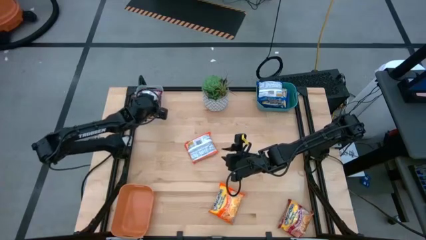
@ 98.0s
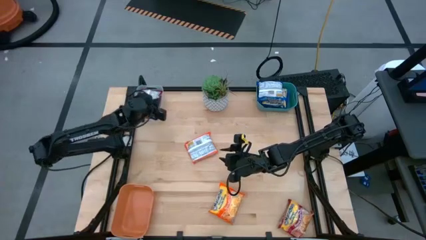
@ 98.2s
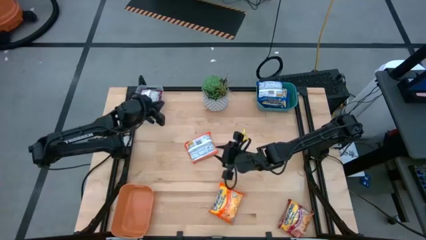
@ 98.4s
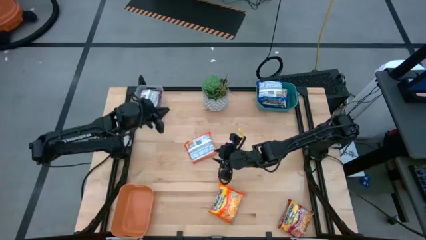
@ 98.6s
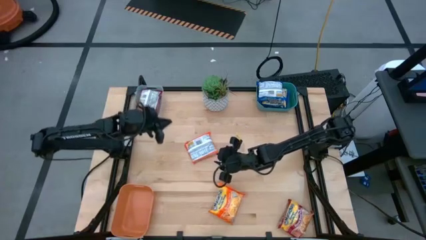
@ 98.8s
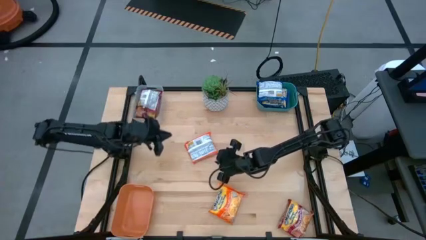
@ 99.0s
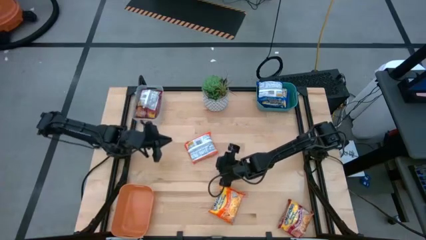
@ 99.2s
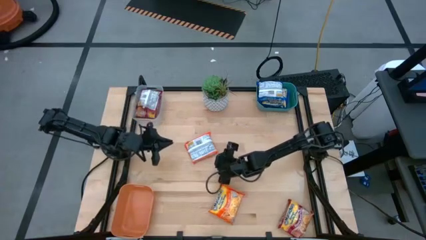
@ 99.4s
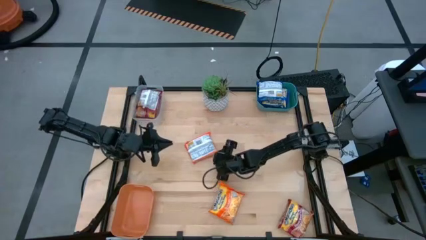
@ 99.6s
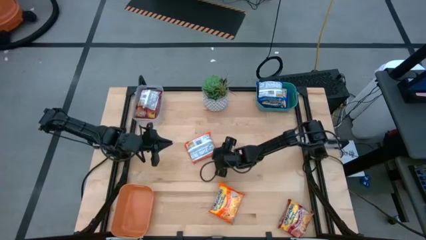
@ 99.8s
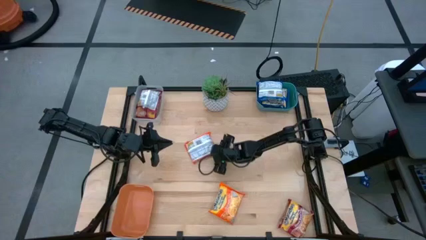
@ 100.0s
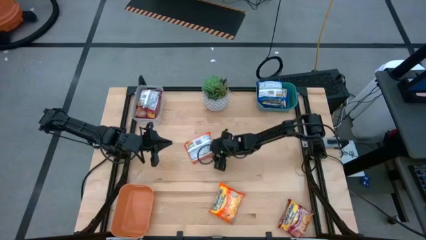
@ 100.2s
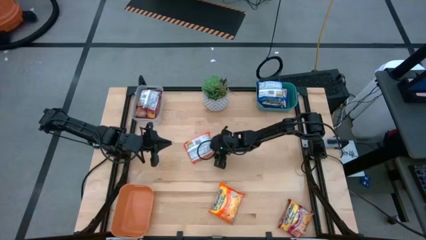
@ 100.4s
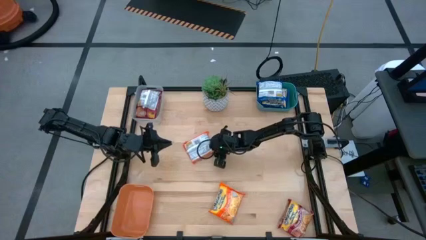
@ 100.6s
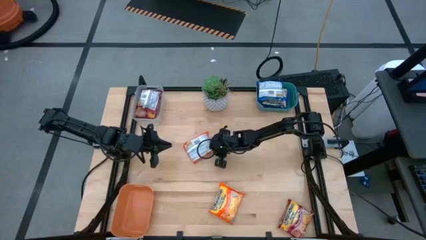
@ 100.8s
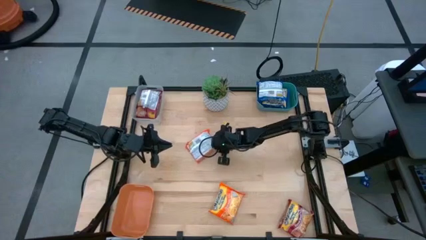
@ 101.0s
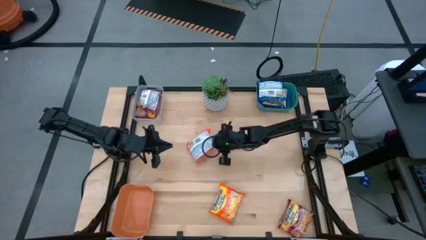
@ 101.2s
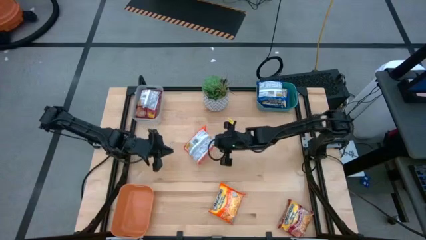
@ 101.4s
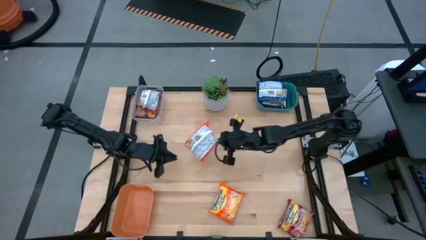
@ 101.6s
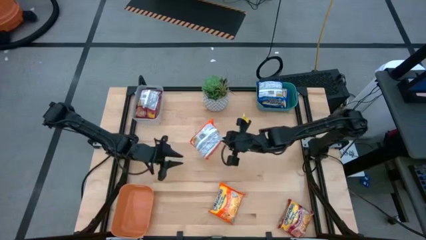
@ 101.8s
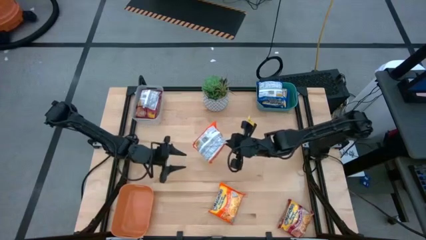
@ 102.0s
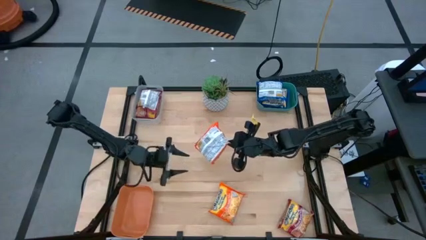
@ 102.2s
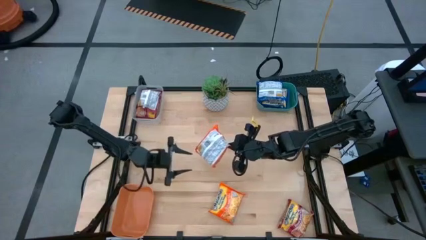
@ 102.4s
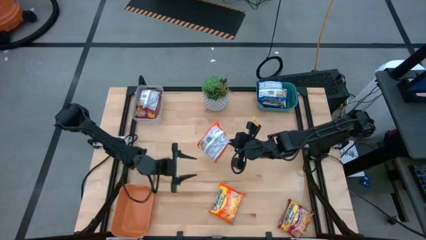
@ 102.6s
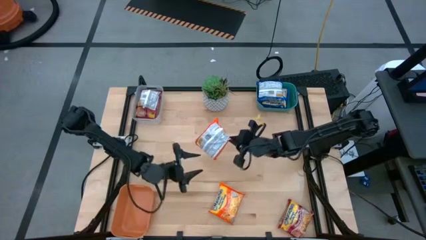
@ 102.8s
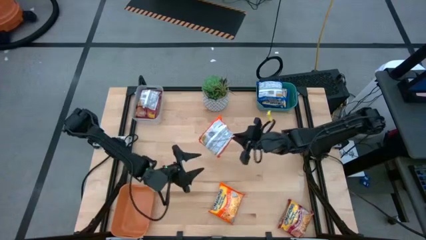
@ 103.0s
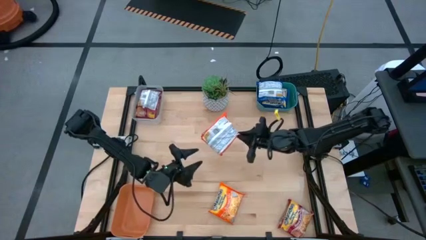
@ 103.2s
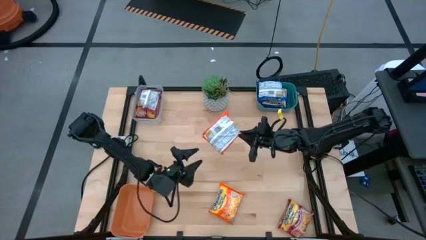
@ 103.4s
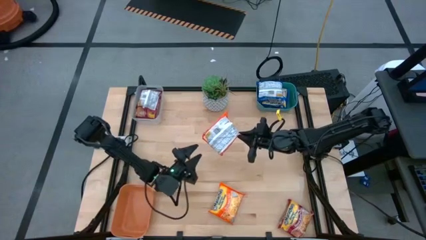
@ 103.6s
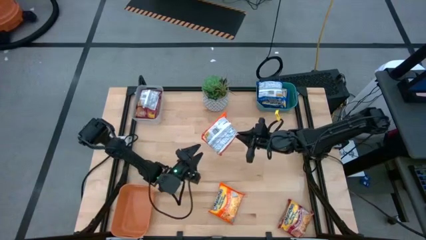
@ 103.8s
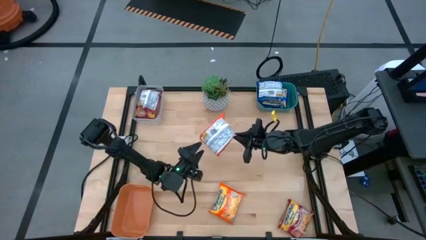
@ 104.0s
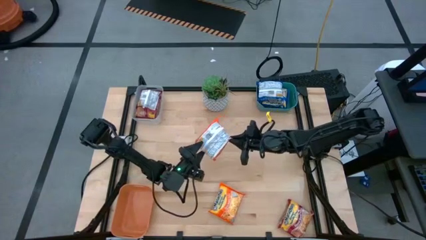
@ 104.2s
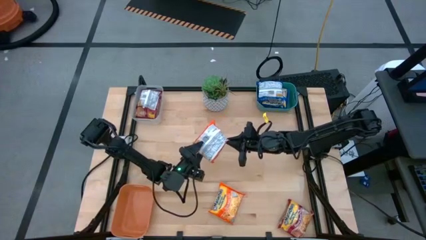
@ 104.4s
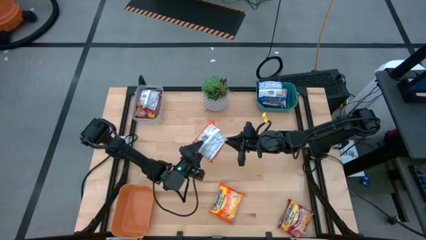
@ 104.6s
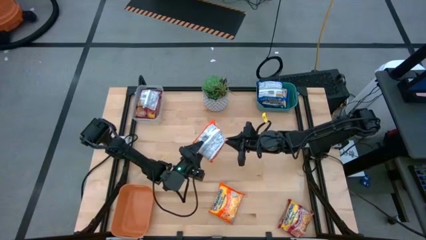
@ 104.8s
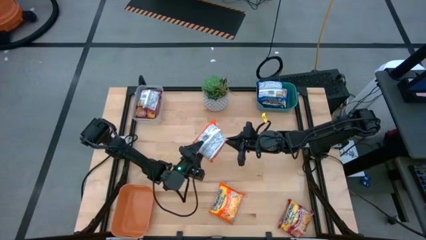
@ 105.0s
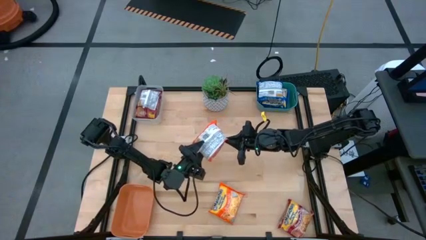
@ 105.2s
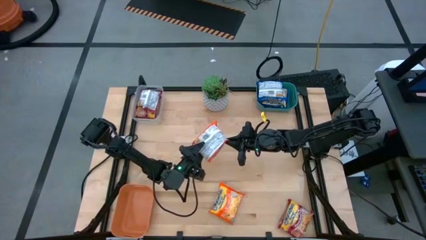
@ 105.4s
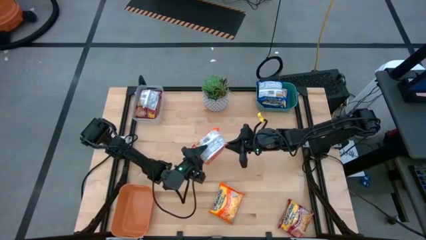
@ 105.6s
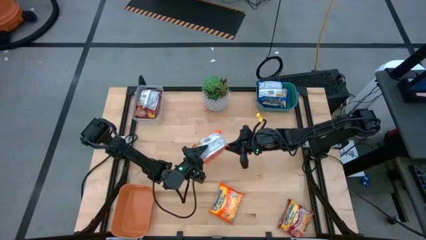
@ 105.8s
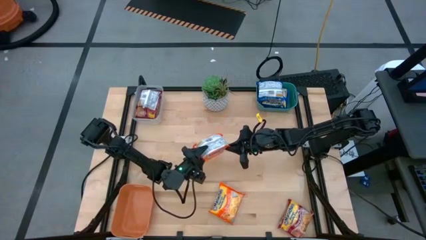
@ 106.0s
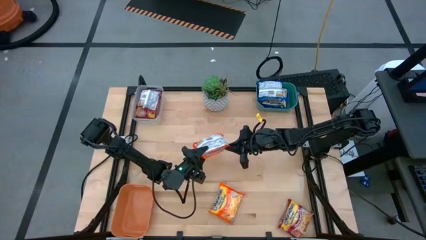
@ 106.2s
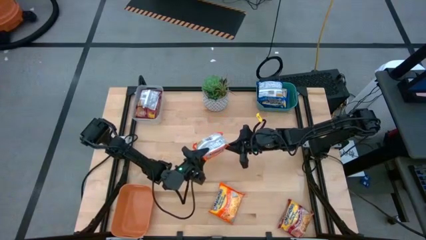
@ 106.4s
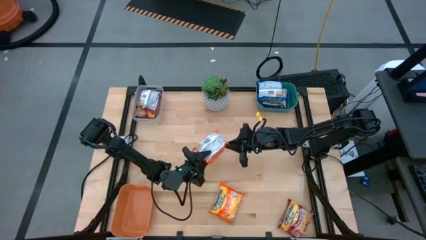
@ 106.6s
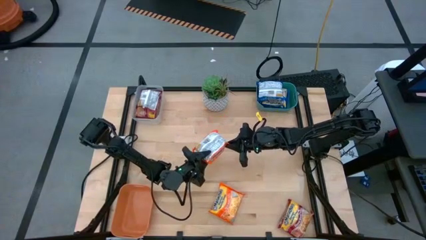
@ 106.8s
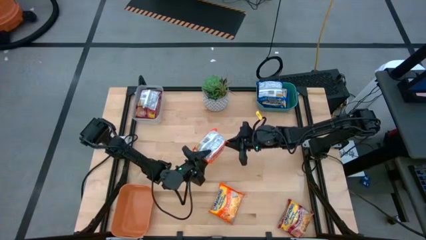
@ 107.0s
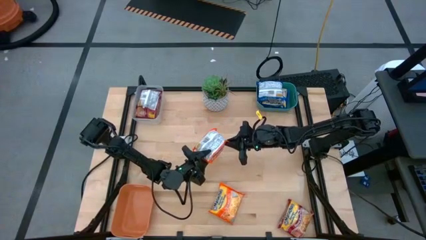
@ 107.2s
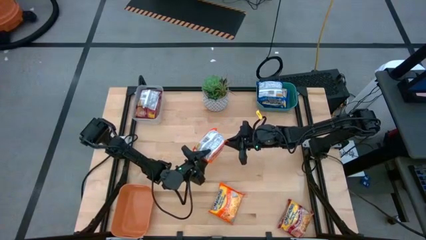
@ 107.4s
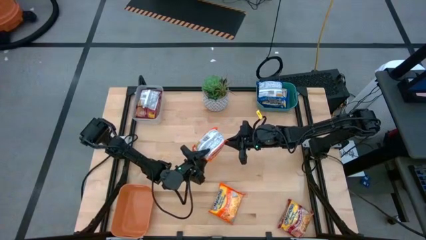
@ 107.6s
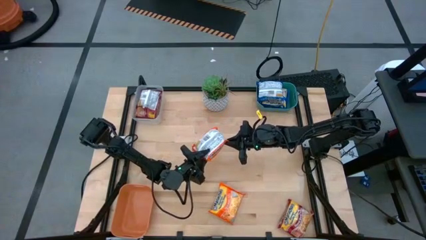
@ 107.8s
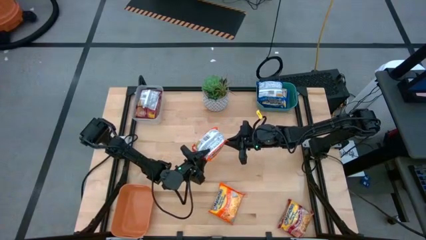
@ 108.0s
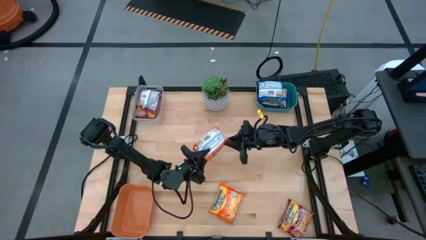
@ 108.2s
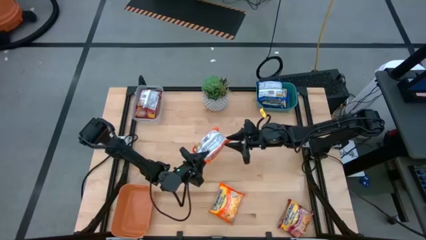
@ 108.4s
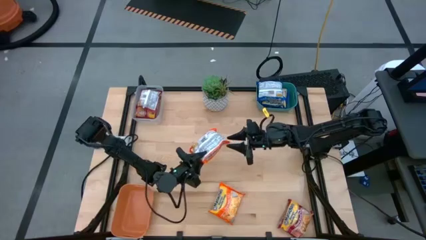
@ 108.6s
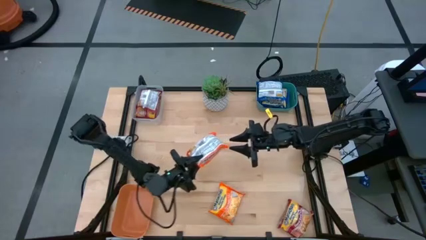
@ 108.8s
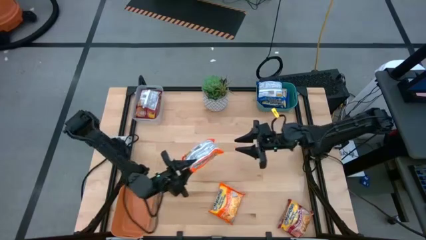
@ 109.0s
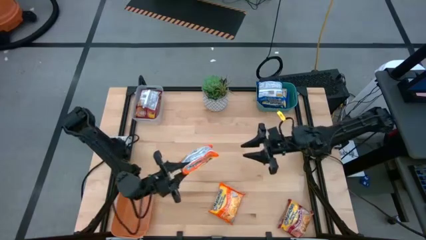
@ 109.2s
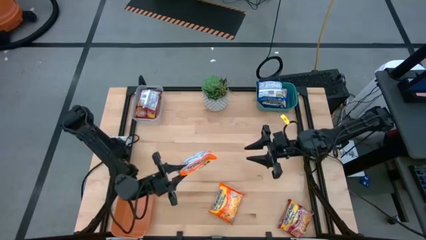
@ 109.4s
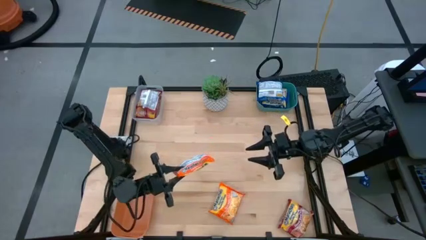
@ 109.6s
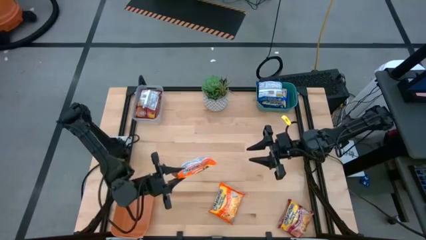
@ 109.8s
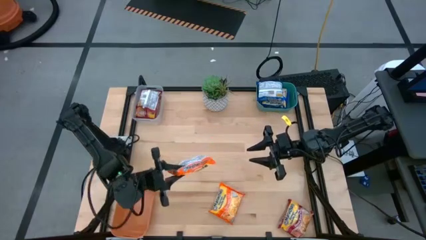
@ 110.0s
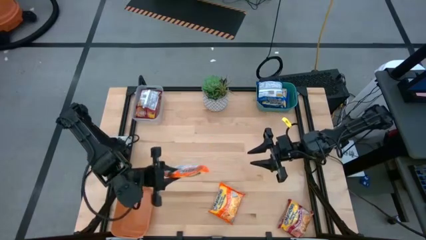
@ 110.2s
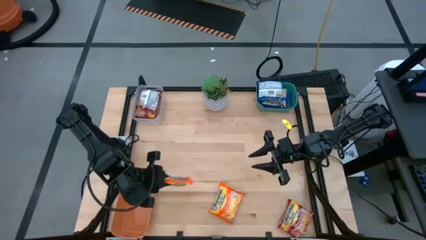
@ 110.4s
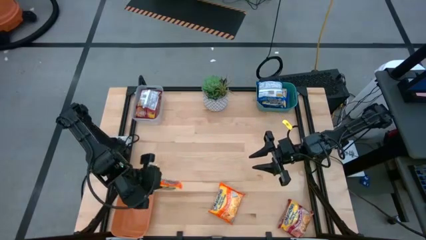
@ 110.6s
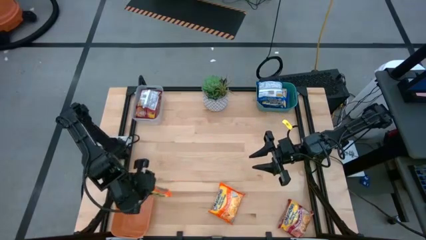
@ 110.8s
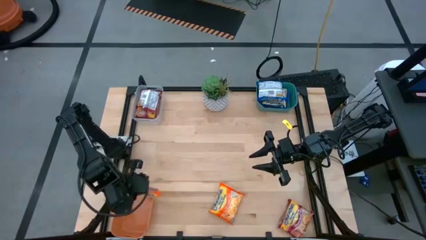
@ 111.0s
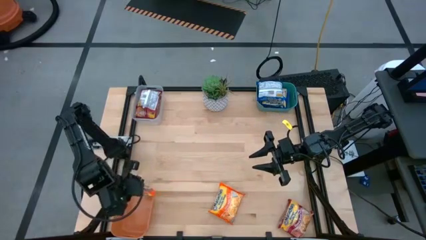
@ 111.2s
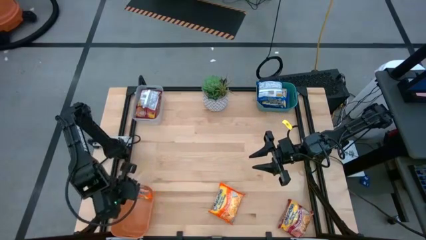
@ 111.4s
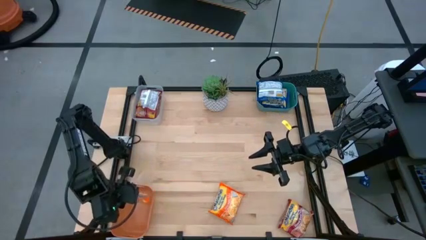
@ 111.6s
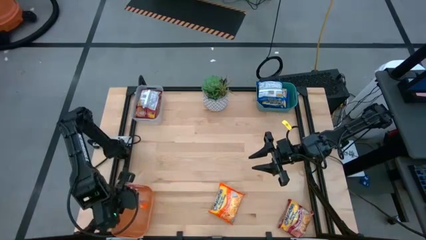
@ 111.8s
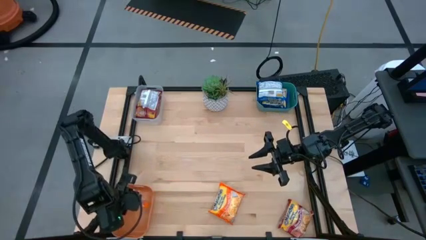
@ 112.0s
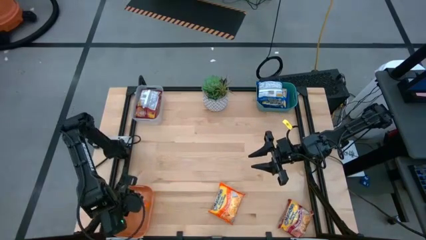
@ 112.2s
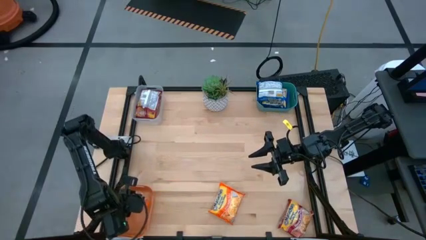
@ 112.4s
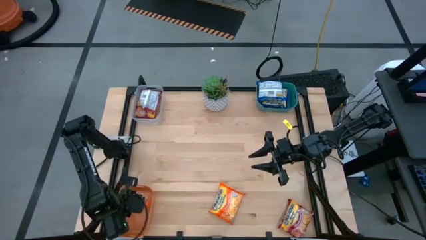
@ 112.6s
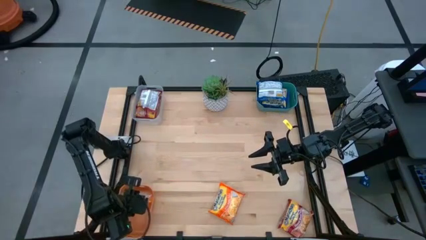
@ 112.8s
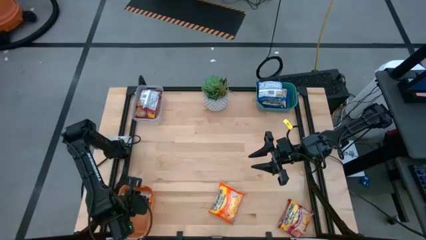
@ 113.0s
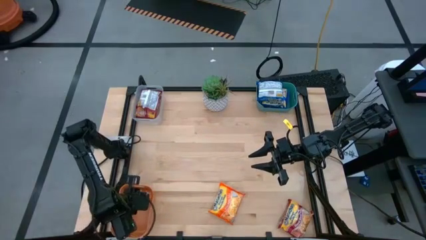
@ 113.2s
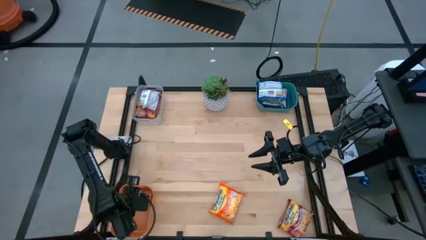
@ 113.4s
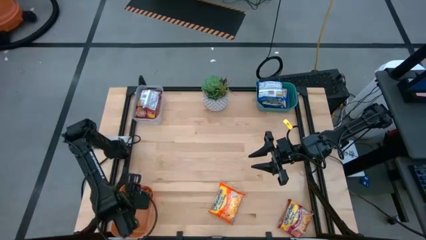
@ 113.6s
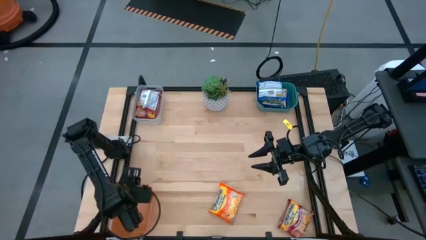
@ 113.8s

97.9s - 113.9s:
Task: Sort Maruchan noodles
Put the top orange noodle pack into the orange bin
